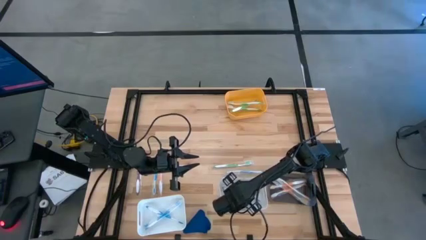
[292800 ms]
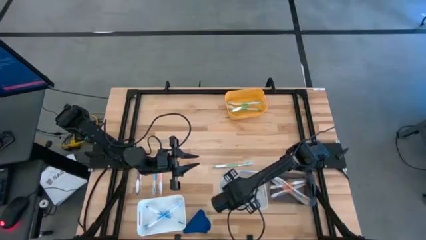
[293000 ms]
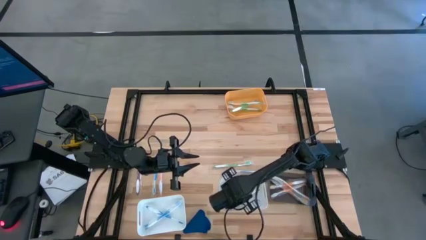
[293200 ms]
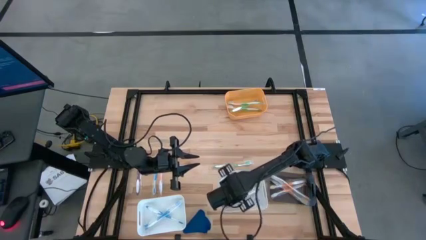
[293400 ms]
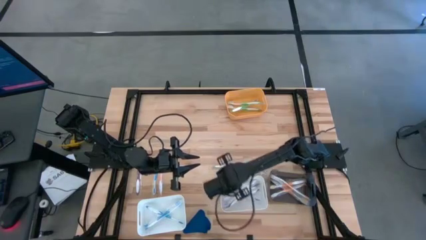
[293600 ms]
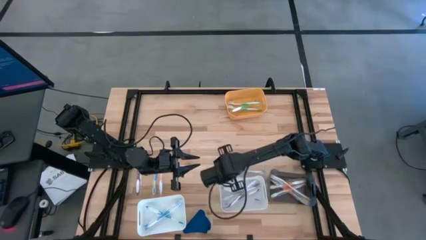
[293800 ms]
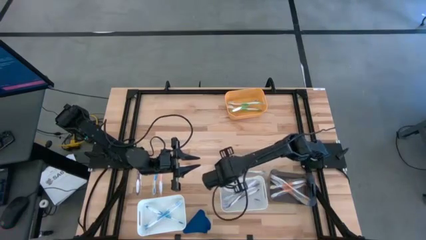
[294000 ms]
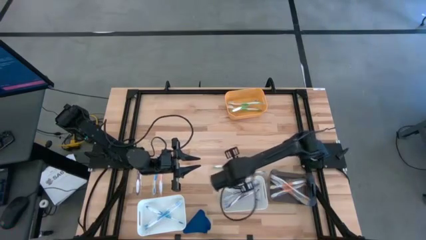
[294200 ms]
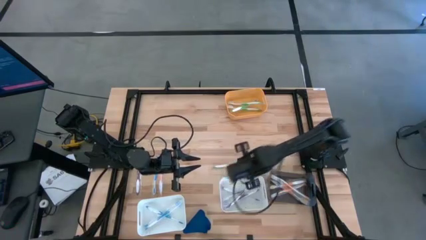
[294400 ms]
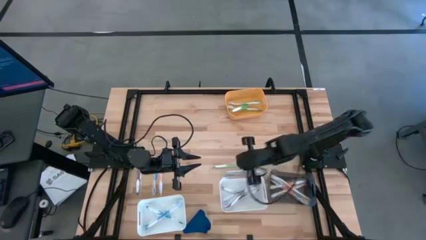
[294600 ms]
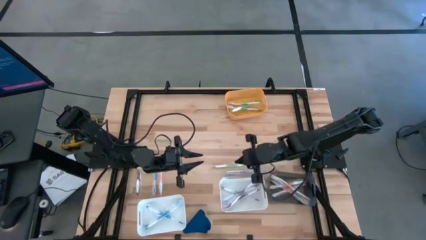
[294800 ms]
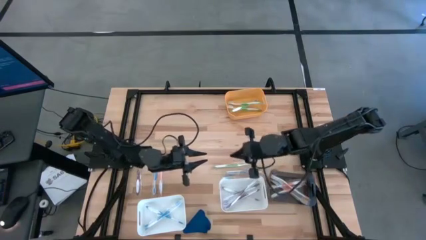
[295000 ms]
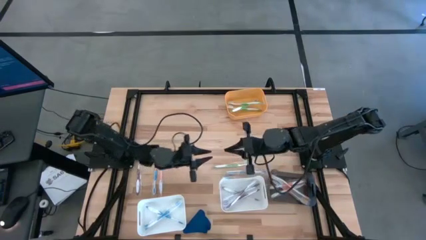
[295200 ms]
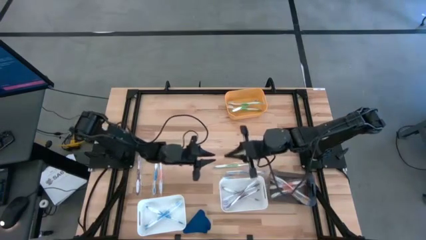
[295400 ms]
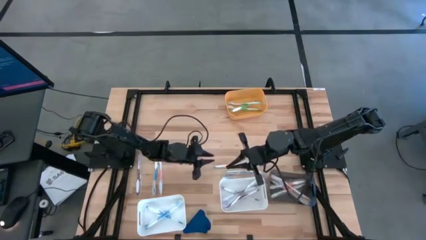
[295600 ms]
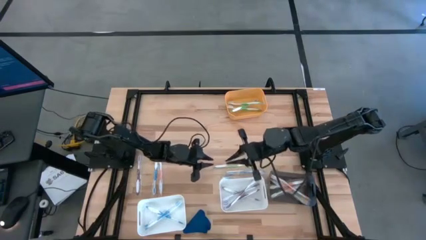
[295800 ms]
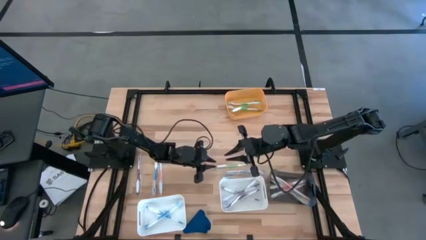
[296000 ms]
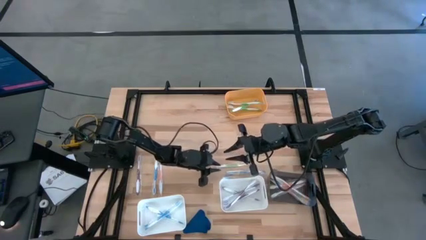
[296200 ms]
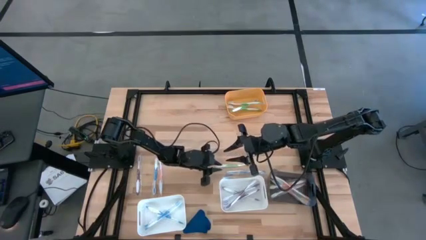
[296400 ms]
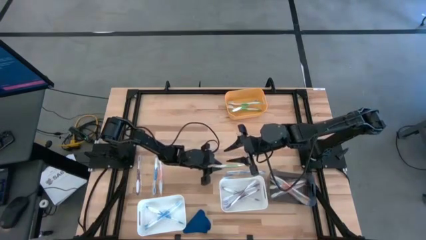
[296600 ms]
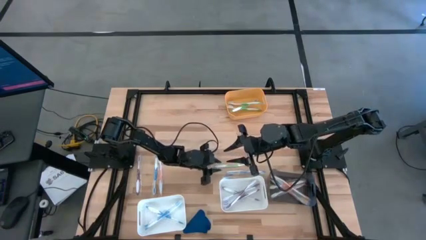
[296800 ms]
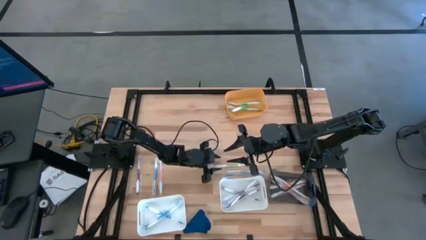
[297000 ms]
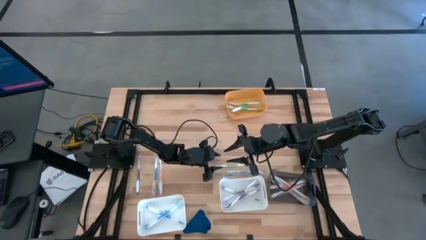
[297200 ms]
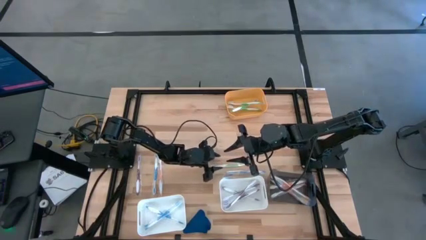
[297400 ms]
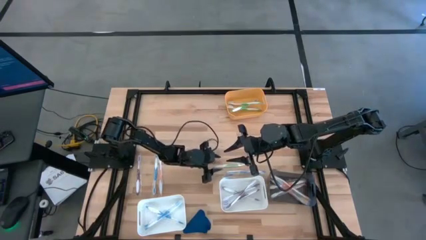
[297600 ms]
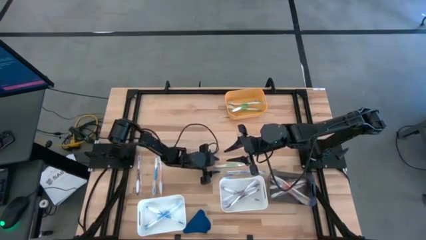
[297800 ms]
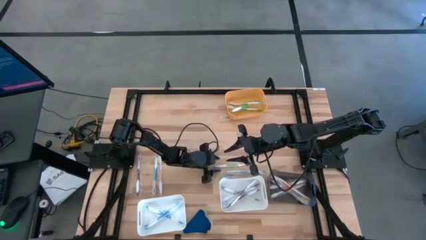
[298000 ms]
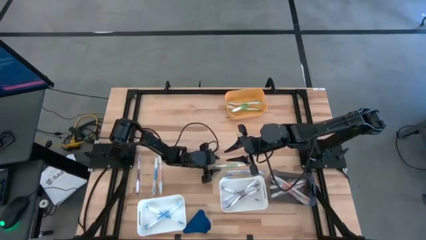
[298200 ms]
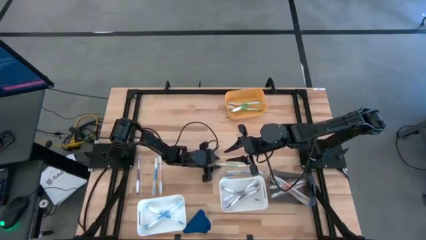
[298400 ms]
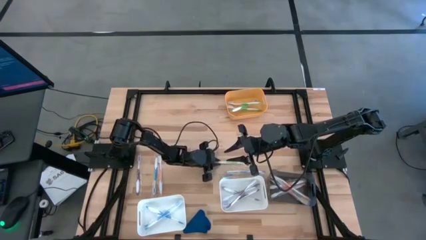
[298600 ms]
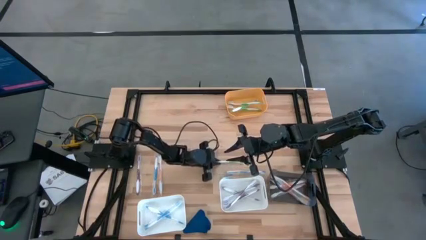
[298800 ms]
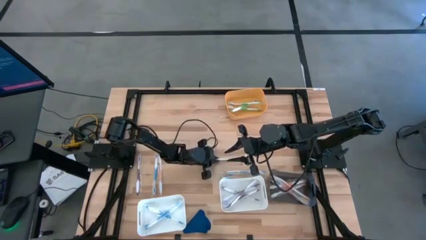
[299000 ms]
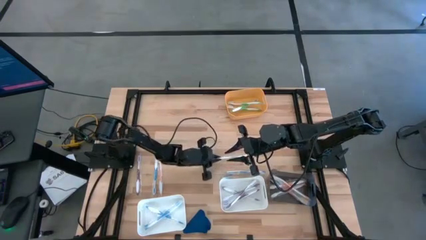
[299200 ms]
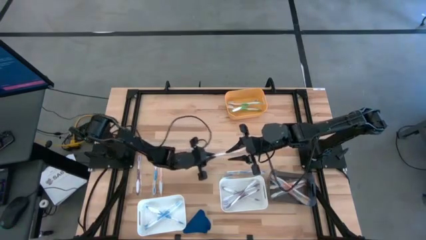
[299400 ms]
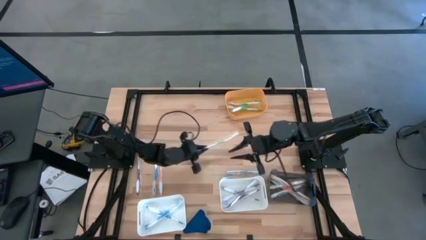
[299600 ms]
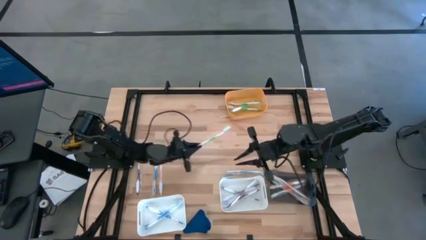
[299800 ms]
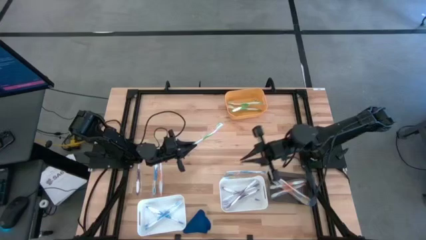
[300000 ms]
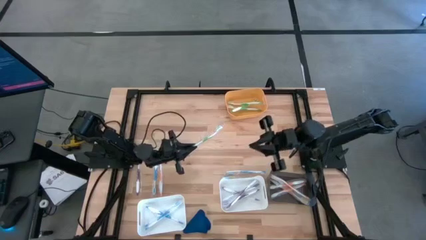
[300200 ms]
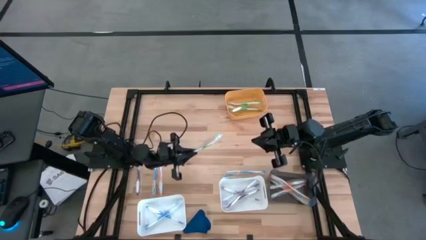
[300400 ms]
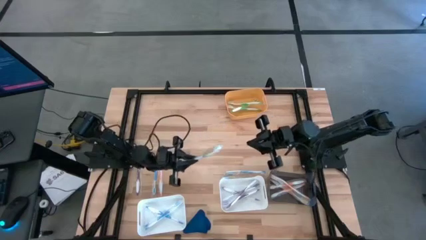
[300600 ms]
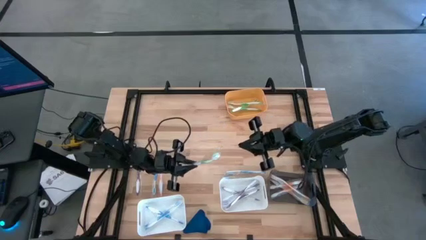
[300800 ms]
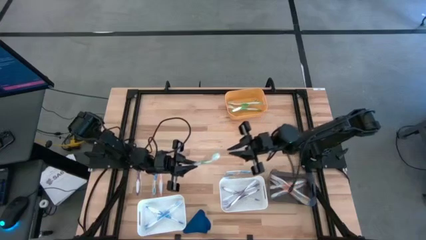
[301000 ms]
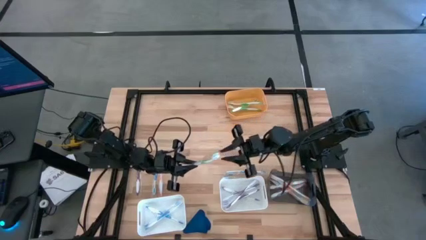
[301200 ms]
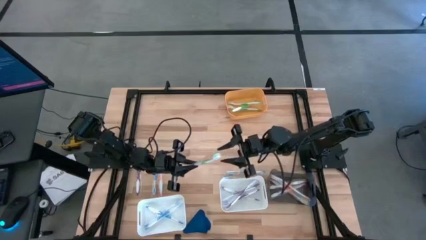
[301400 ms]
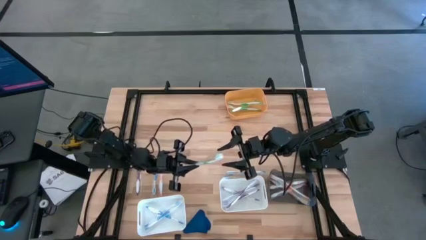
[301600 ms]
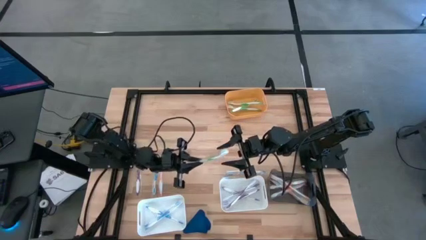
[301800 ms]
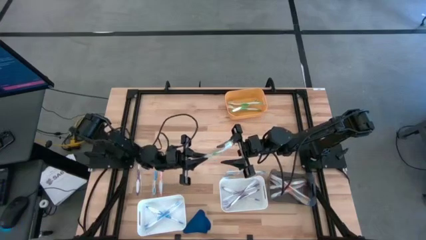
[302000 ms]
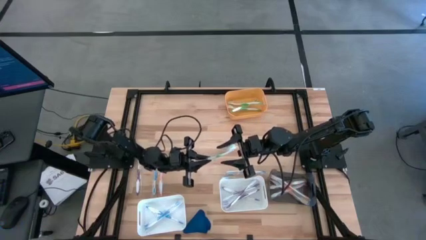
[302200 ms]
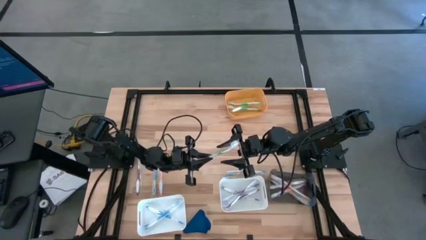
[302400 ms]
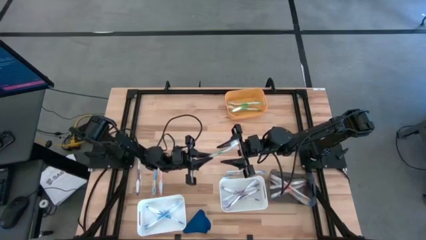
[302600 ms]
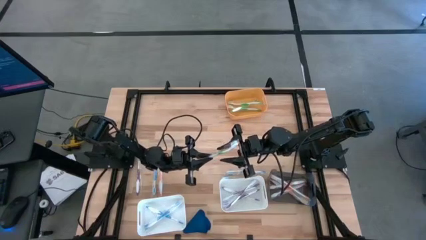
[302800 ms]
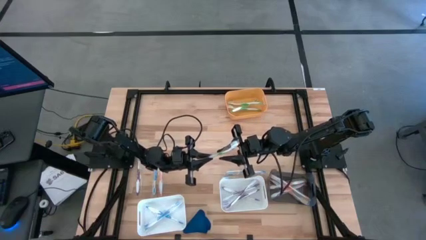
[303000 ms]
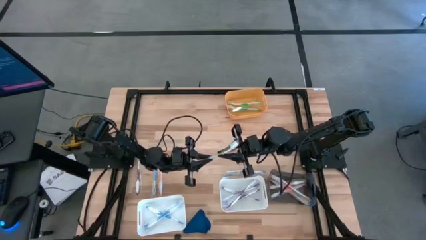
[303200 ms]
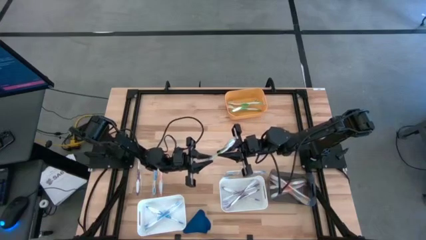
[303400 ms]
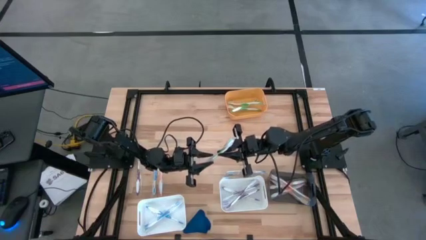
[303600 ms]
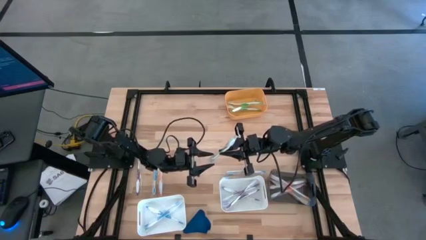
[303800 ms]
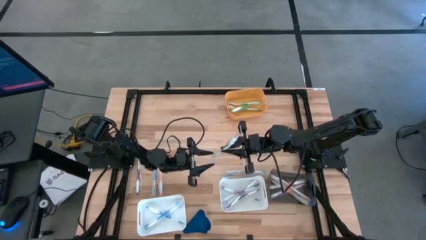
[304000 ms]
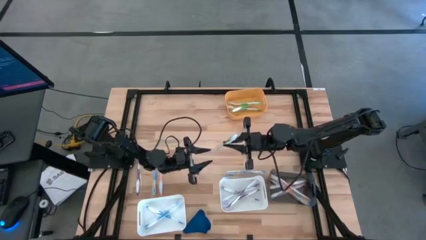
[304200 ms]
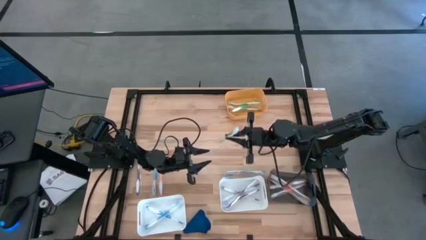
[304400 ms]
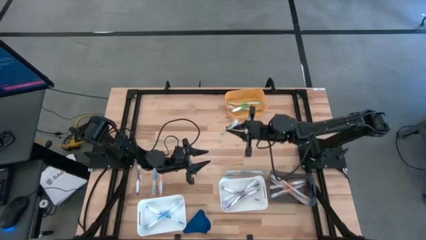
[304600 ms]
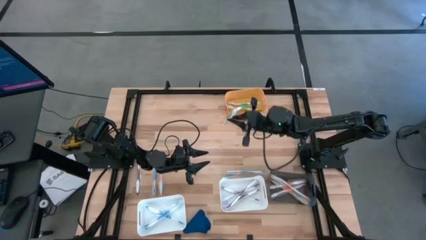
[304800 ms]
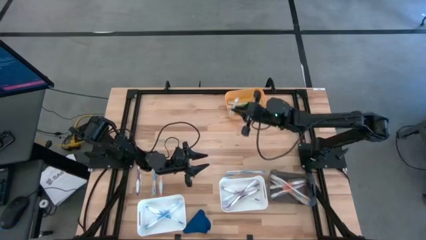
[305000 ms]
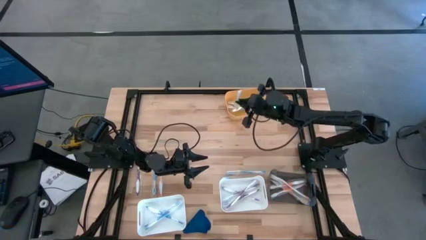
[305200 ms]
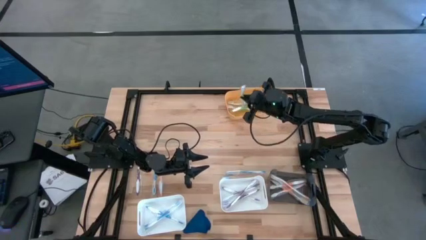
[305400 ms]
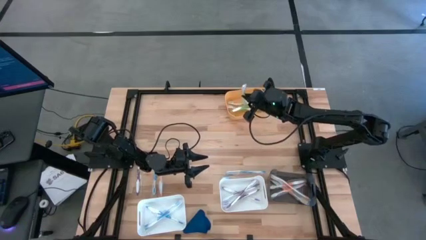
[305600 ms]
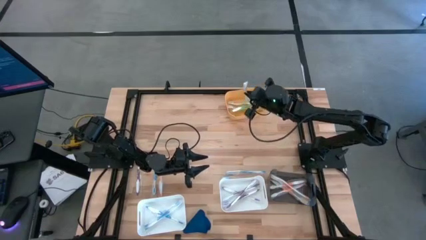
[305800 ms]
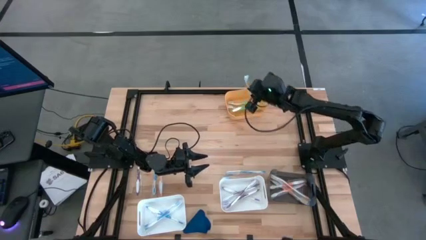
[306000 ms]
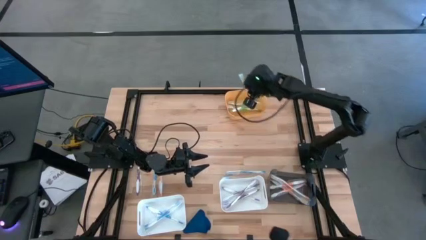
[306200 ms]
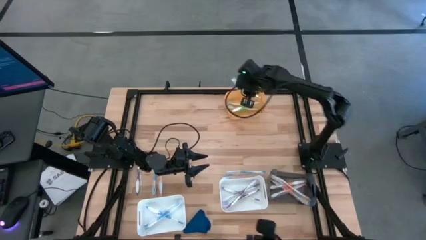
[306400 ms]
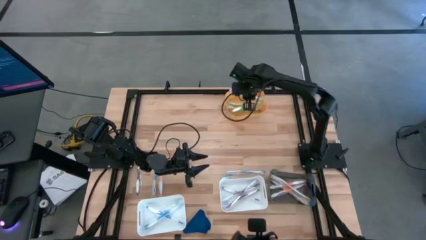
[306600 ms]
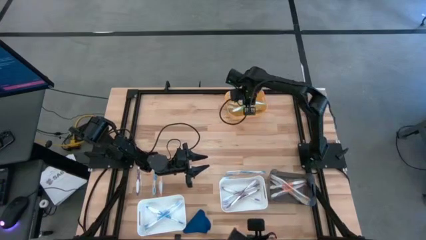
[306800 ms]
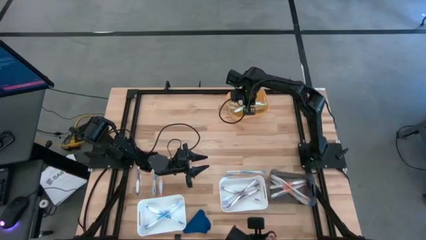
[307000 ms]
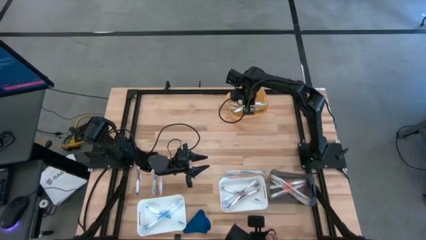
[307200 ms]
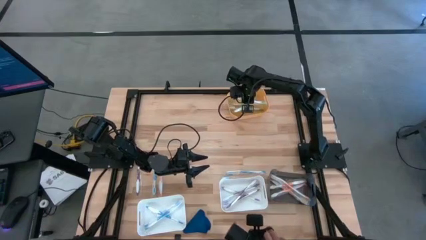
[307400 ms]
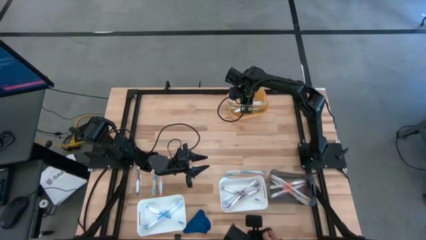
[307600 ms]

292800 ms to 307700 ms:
Task: Pick & Place Toothbrushes
Put the green toothbrush into the yellow bin
